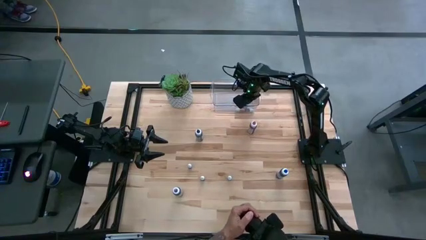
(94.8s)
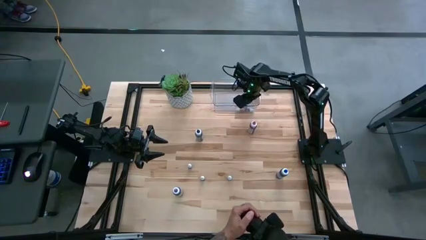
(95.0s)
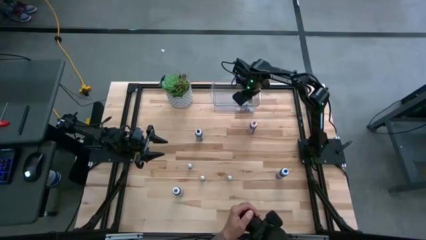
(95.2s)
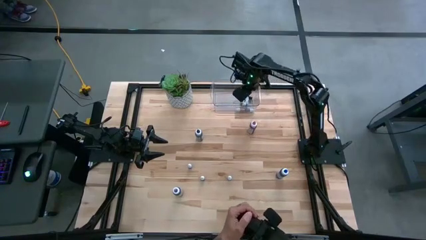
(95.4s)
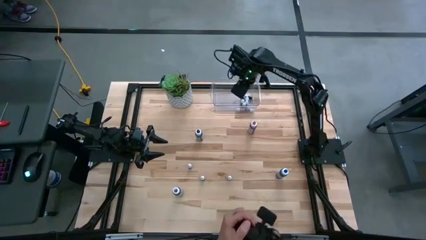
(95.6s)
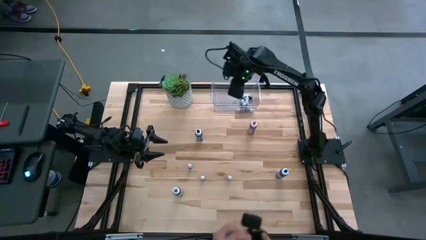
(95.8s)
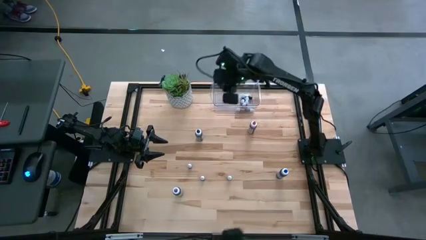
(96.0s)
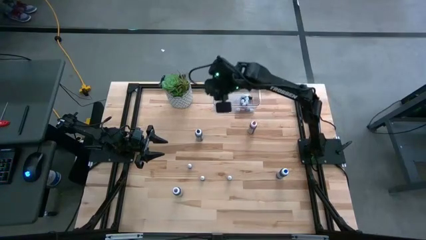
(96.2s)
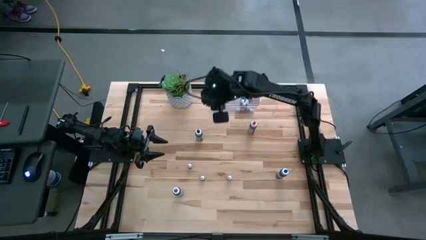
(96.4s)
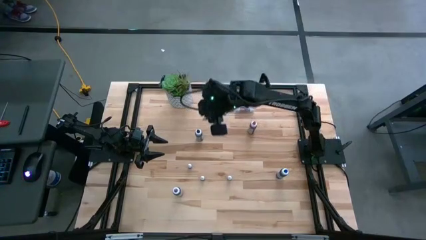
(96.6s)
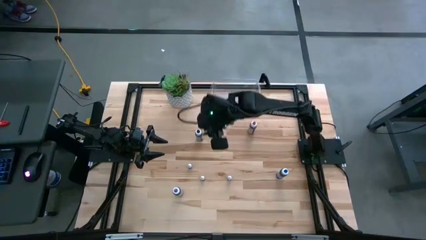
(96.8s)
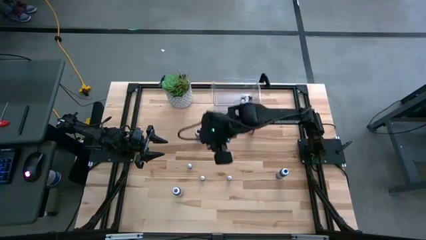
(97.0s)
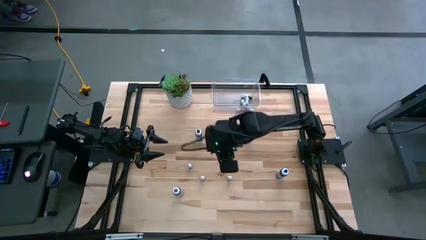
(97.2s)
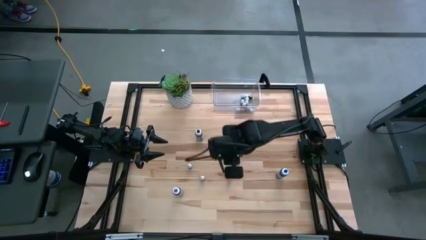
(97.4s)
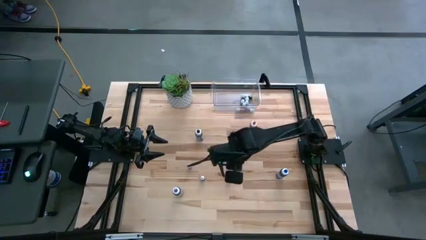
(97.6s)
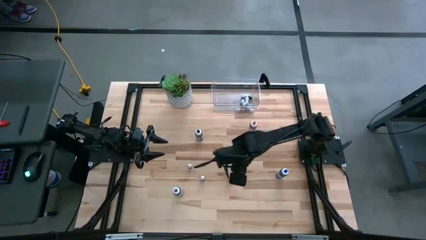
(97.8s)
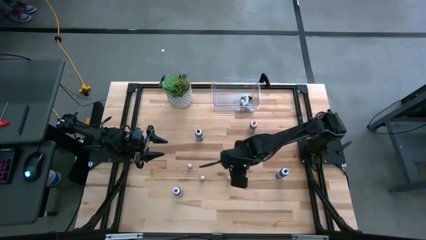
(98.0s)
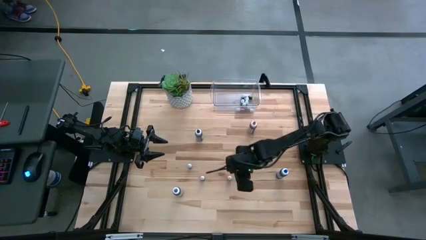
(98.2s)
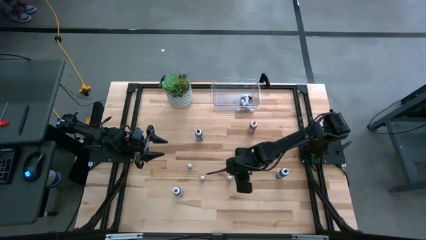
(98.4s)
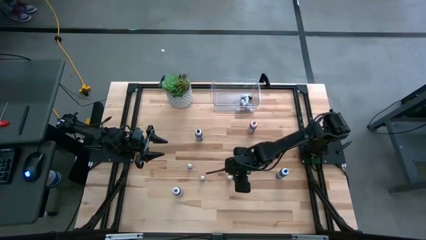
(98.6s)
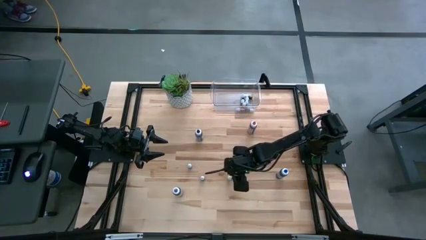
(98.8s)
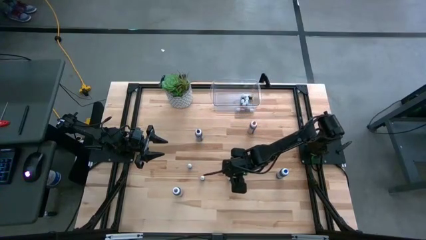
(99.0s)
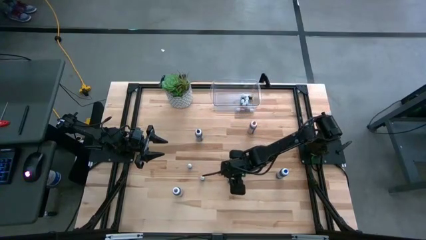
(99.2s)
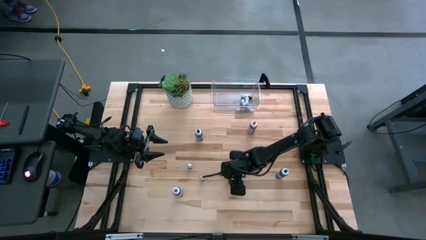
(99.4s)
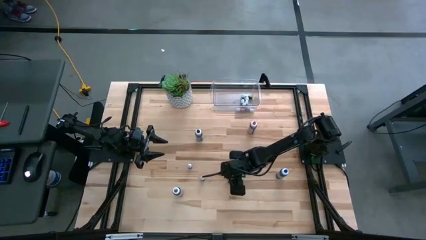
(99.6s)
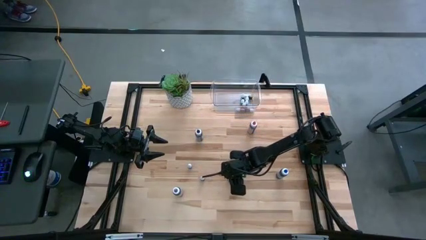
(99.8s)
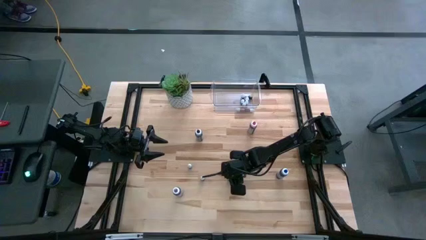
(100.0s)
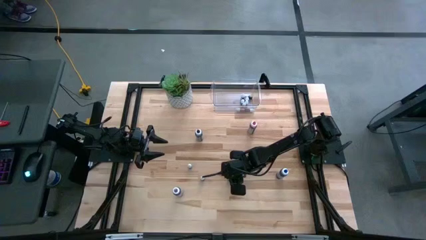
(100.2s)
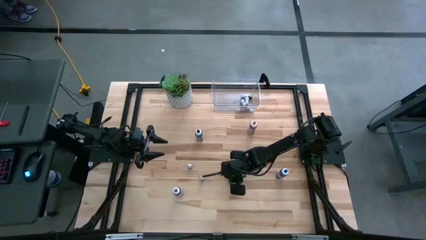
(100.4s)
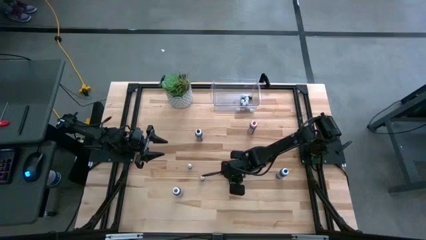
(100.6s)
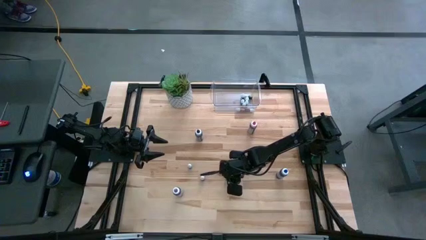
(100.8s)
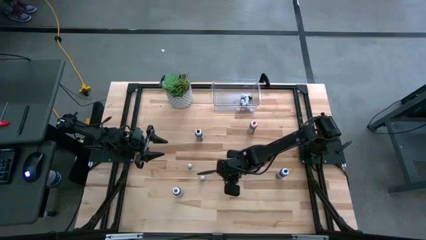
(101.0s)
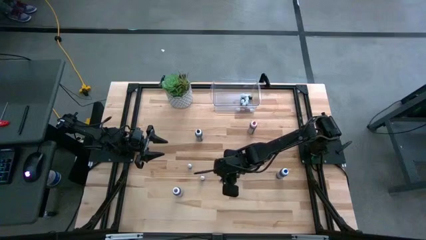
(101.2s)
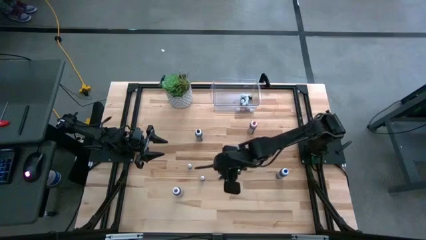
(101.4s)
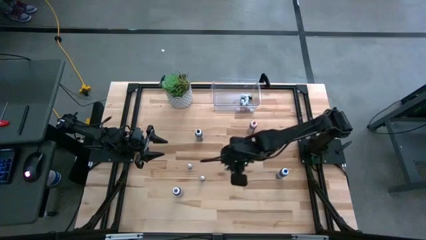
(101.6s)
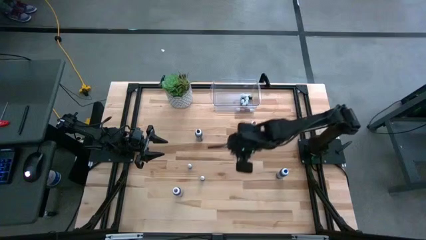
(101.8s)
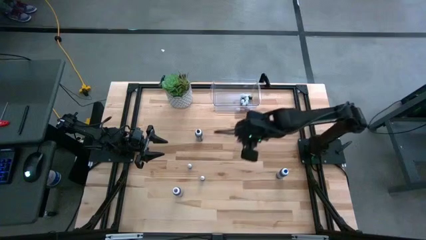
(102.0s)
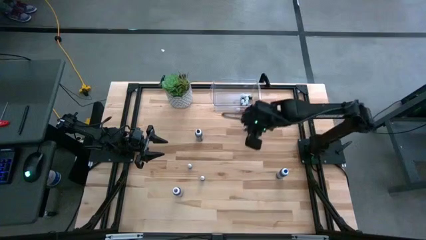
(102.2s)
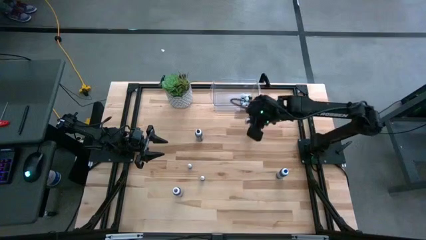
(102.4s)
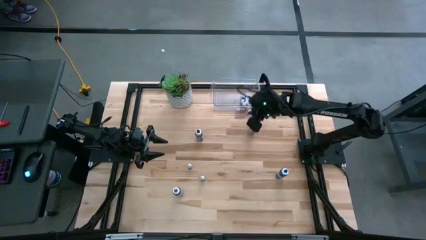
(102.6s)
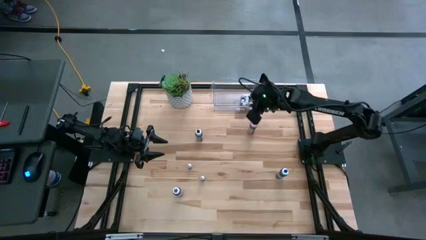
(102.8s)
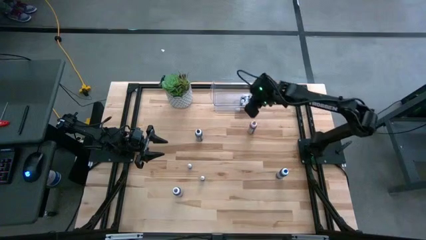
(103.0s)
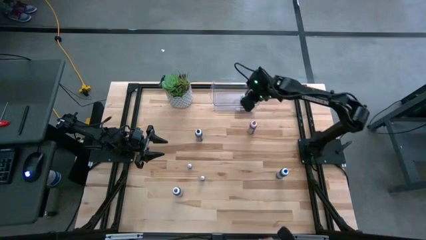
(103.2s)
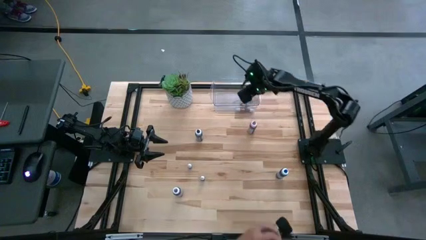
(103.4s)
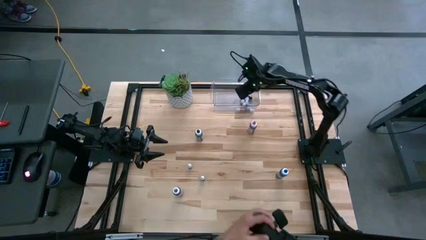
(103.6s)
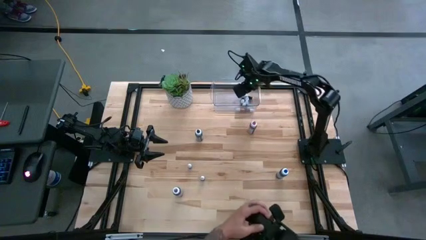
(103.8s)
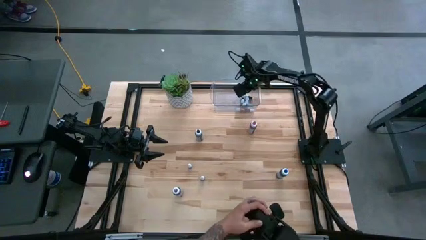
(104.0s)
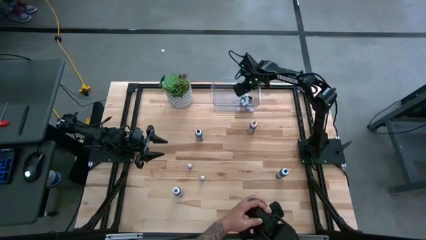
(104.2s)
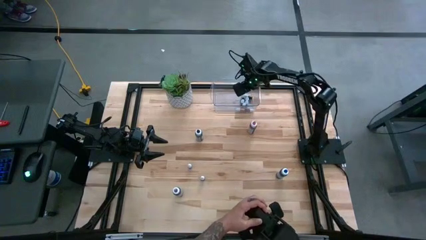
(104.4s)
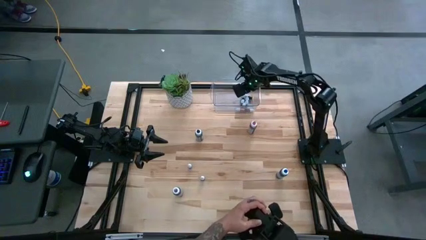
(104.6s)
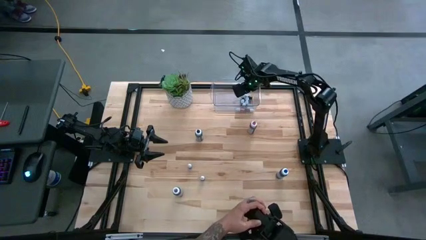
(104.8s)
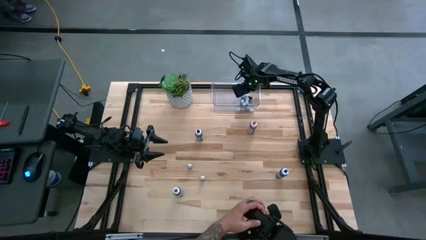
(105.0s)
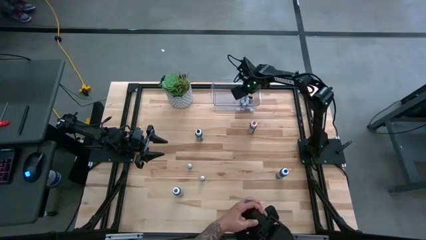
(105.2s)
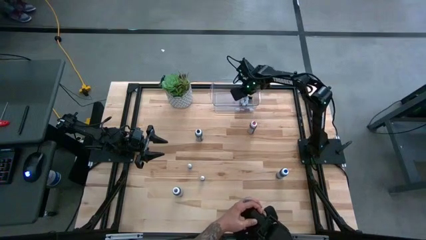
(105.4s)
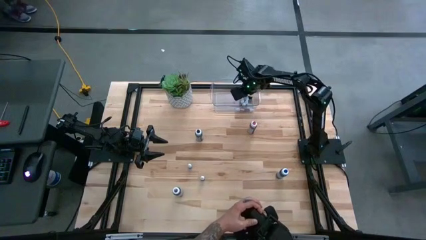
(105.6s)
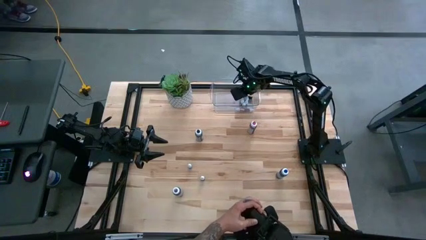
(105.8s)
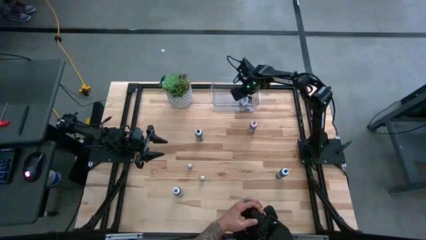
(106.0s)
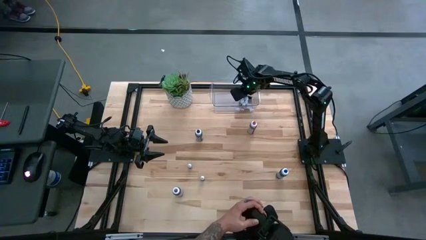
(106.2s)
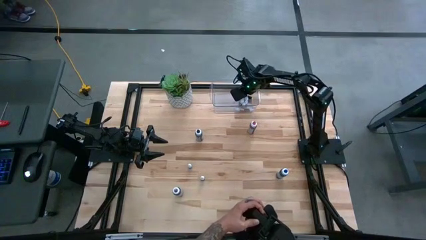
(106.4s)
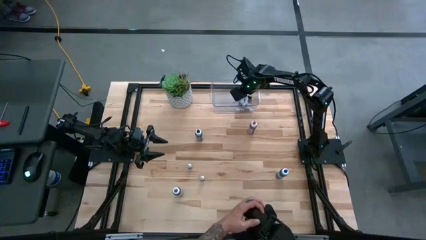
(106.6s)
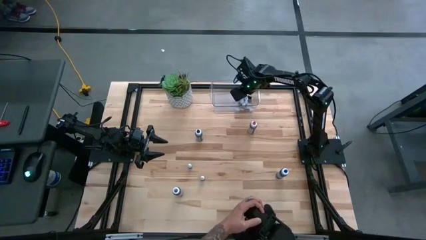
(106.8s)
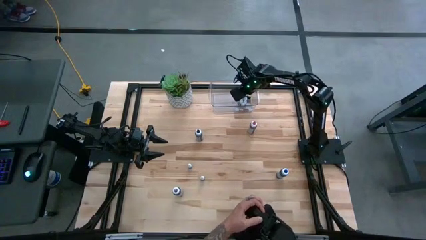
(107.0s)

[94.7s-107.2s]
Task: Pick & Place food coloring
Put the small green food coloring bottle into the bin
